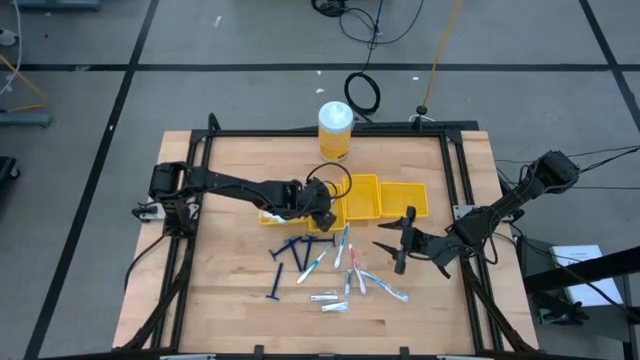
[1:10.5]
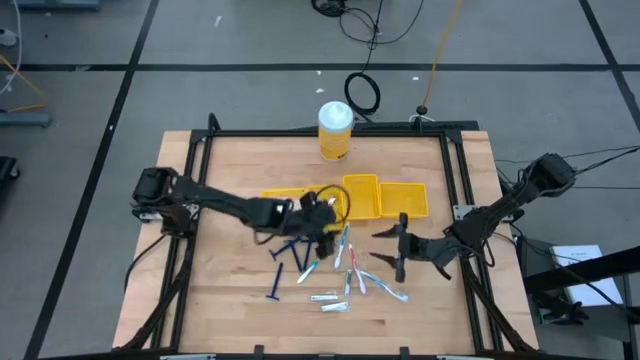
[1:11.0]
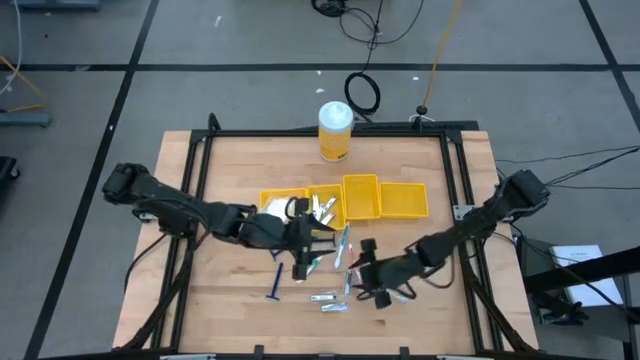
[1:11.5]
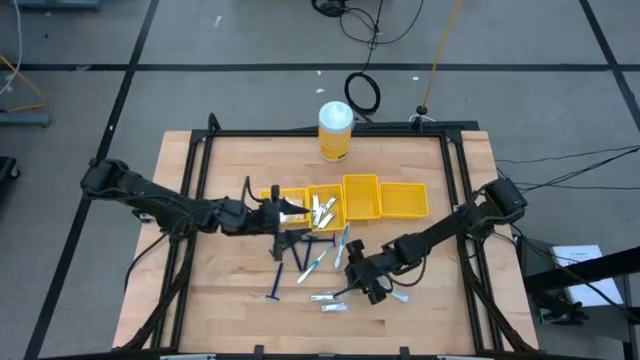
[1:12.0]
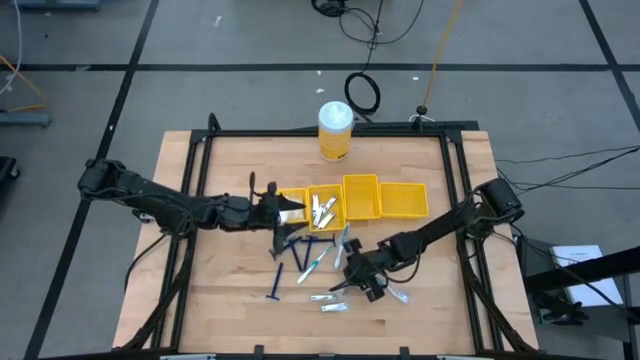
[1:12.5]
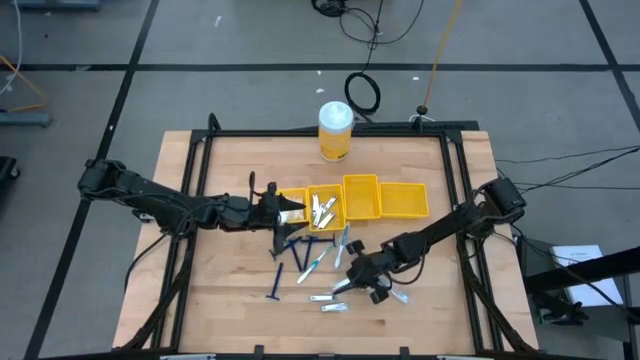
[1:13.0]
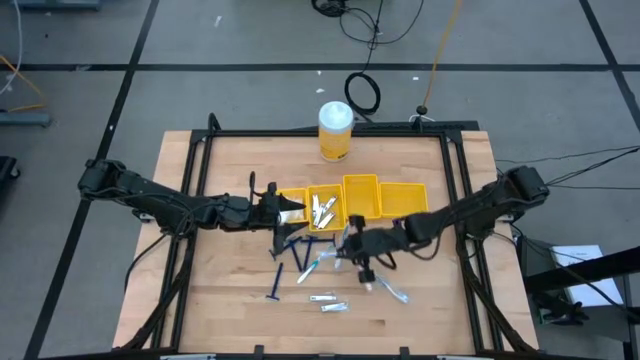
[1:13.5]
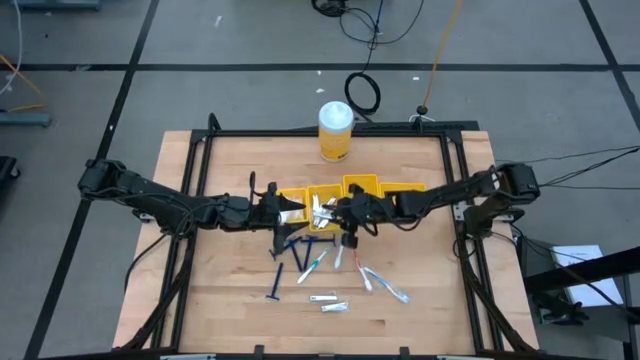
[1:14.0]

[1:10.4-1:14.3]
Task: Pick & Place Travel size toiletries
Put the top silver nail cutter into the middle left yellow bin

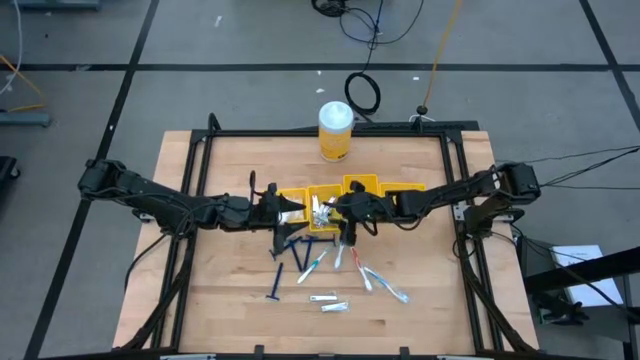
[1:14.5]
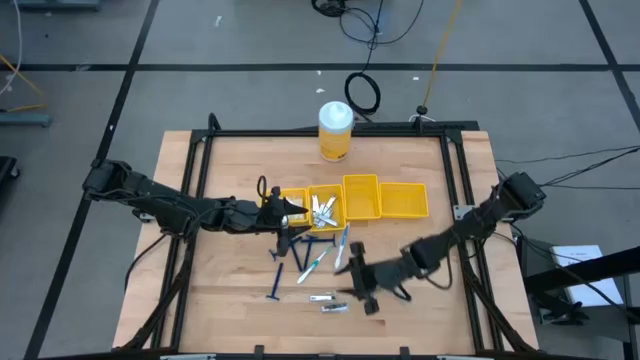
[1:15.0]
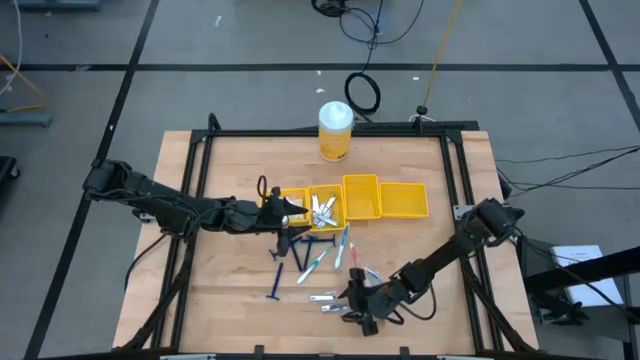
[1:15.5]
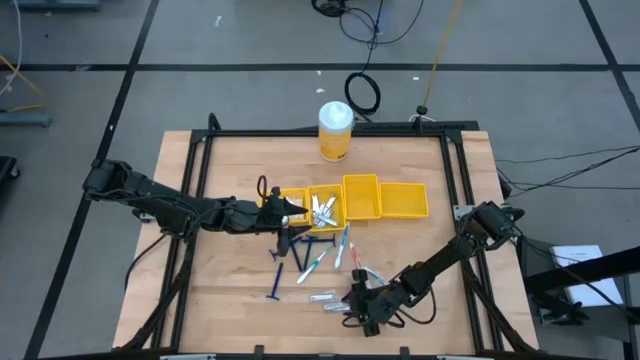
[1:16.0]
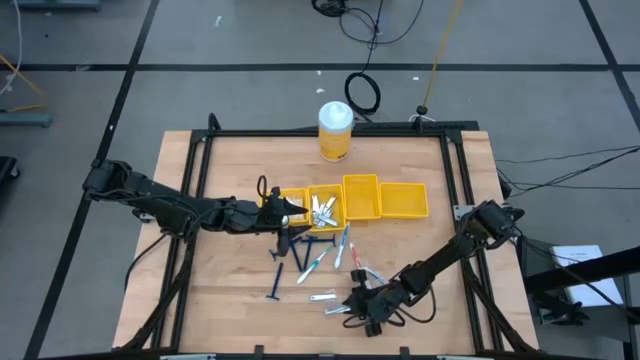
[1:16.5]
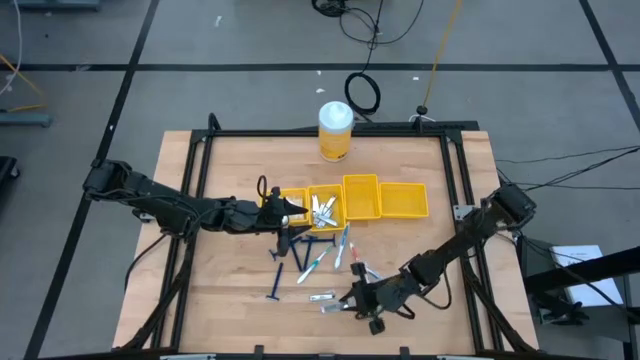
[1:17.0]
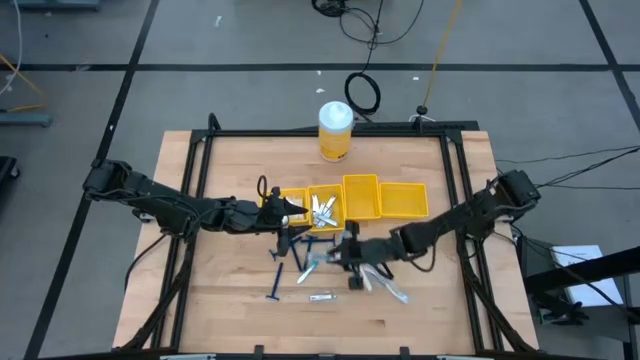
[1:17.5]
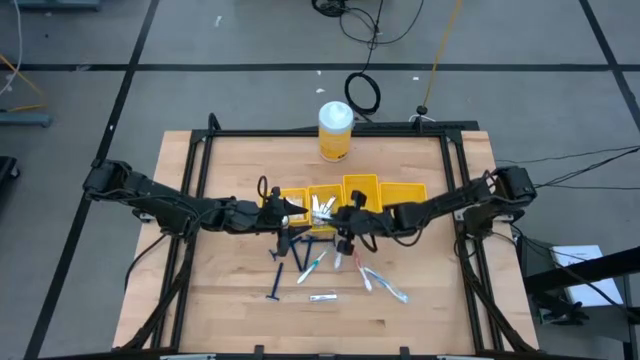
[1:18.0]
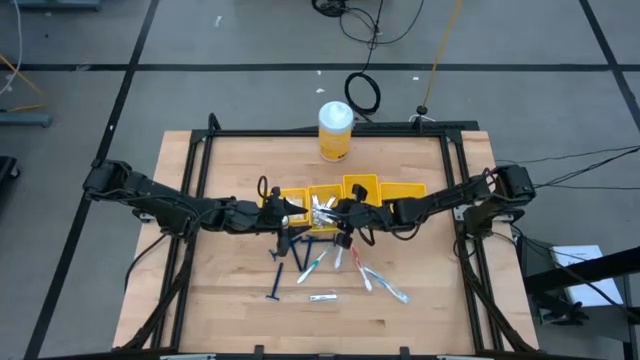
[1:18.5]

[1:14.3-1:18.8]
Put the bottom silver nail cutter into the middle left yellow bin

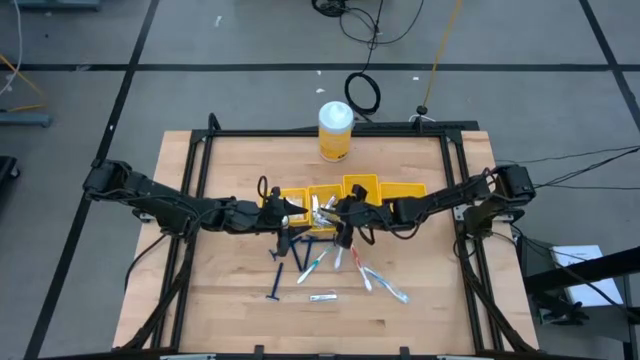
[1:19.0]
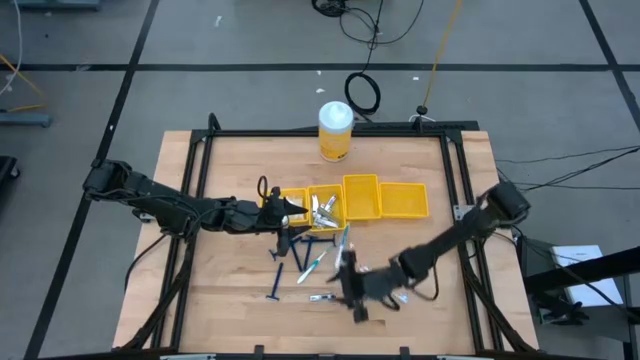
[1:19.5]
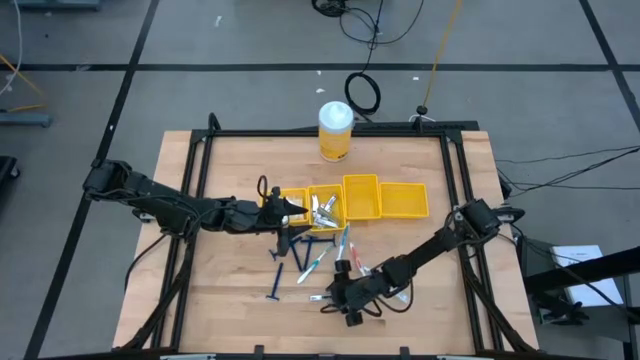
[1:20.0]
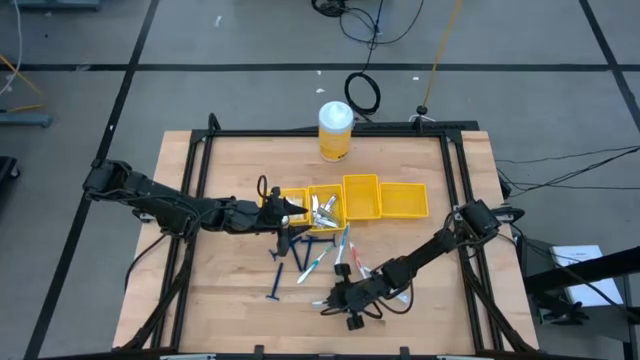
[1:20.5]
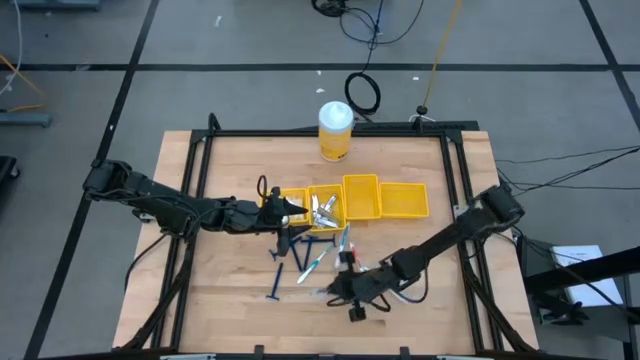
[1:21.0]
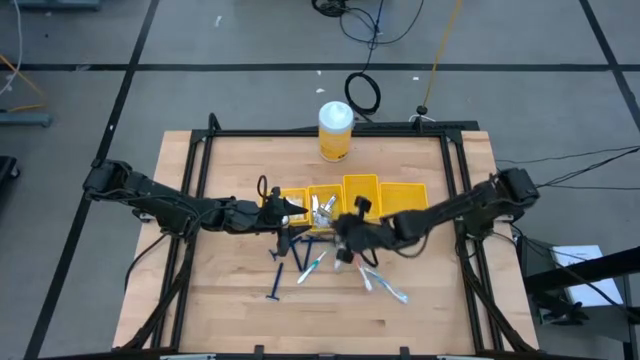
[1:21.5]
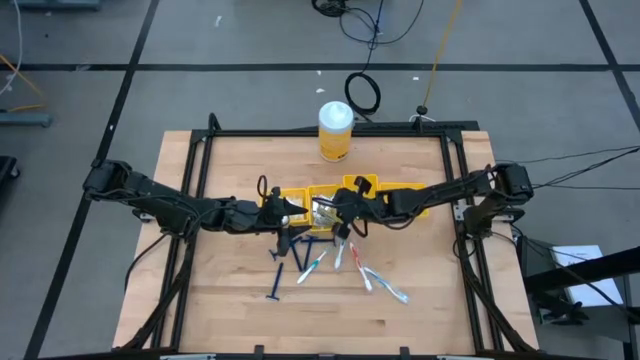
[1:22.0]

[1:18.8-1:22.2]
Put the silver nail cutter into the middle left yellow bin

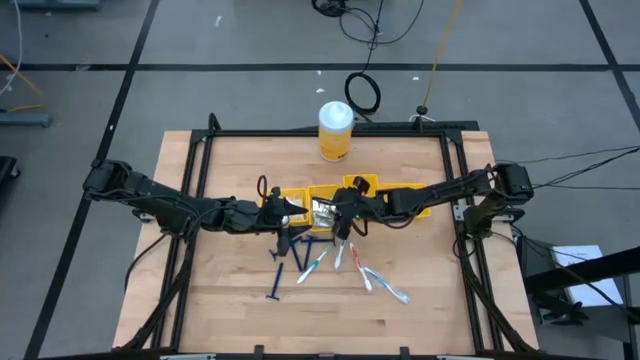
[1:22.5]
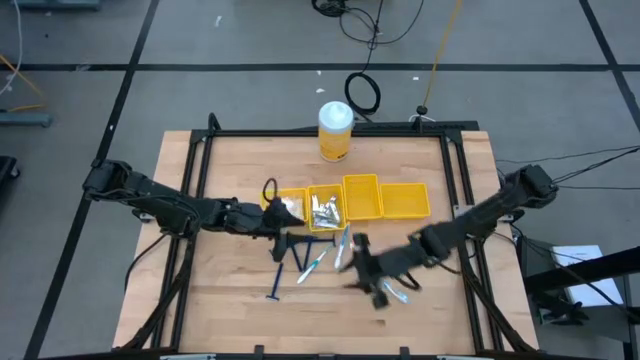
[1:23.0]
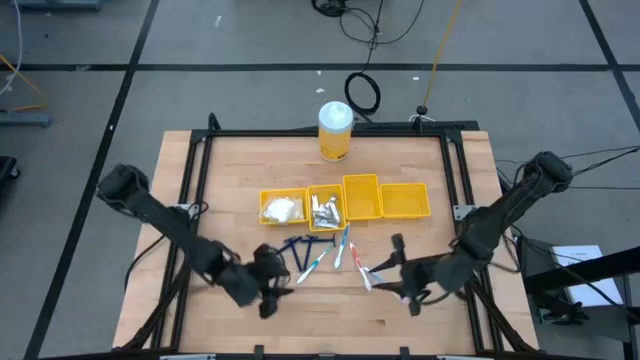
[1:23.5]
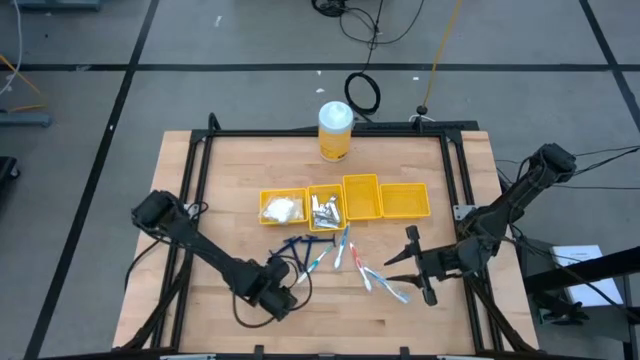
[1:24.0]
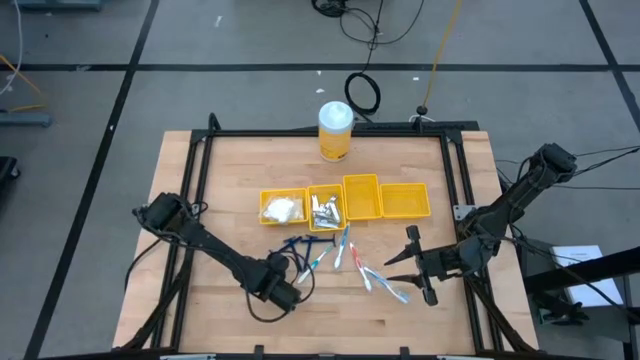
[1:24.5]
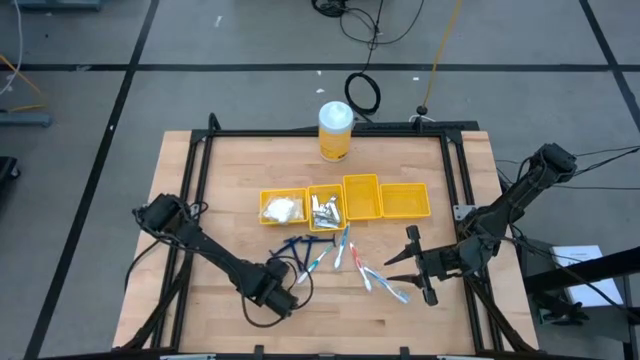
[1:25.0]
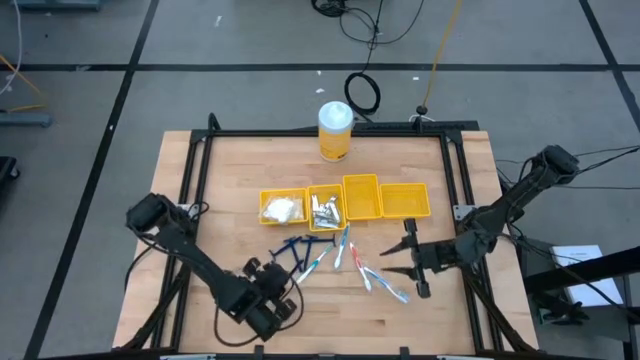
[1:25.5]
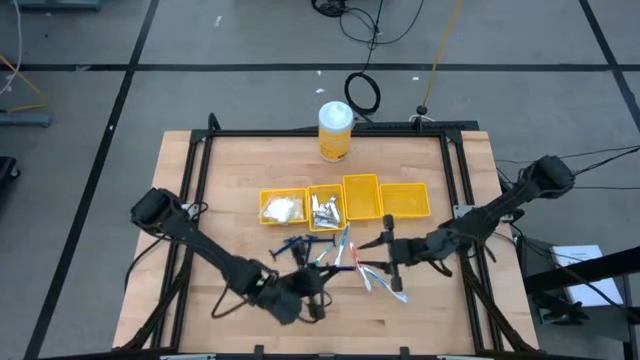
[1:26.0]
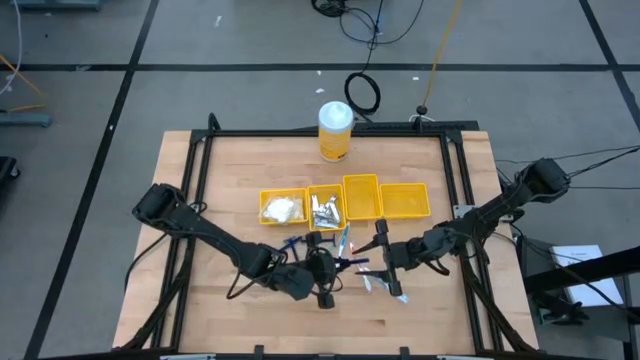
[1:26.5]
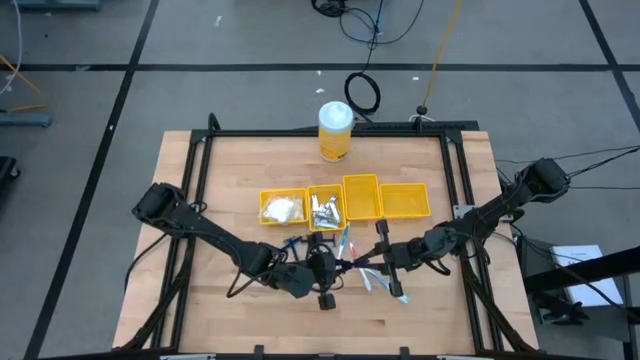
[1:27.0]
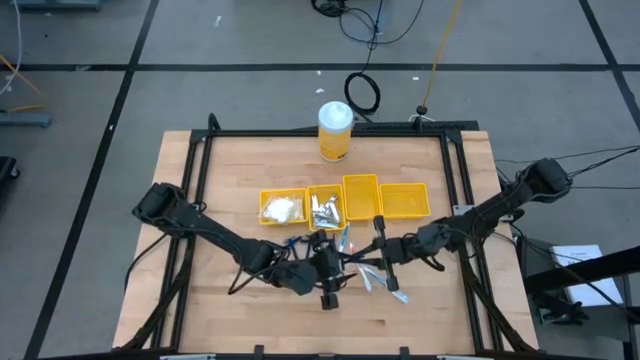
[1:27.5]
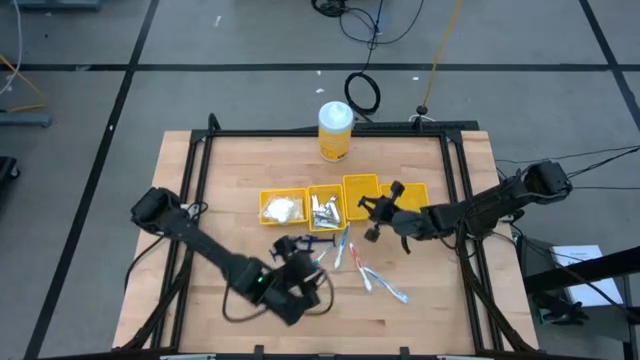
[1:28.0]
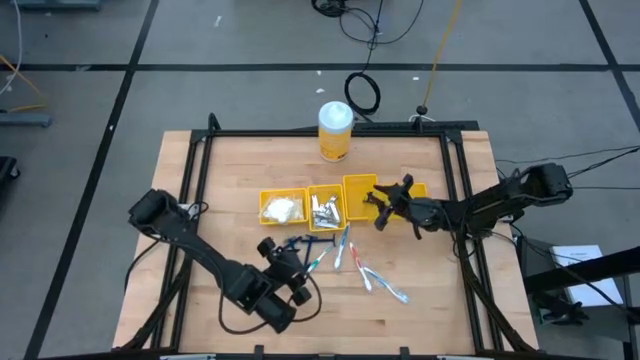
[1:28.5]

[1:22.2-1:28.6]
Put the blue razor into the middle right yellow bin

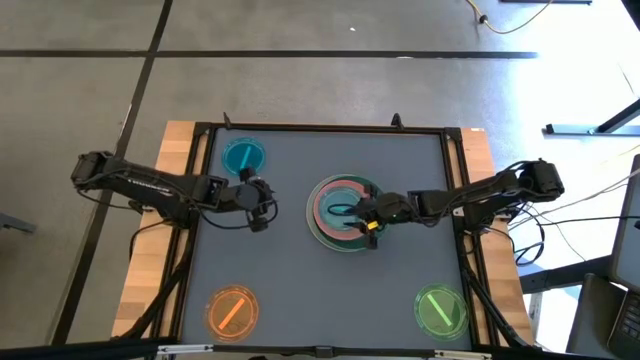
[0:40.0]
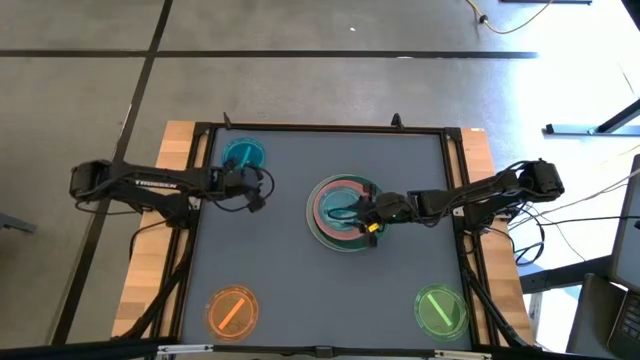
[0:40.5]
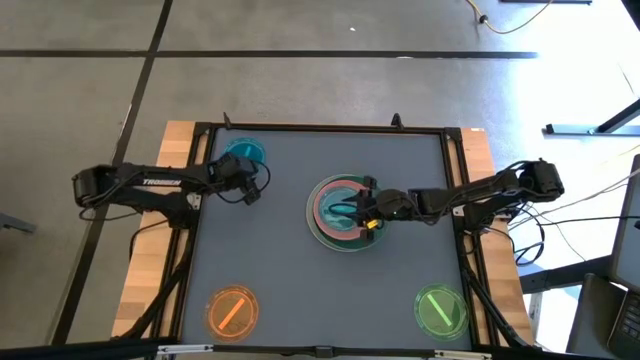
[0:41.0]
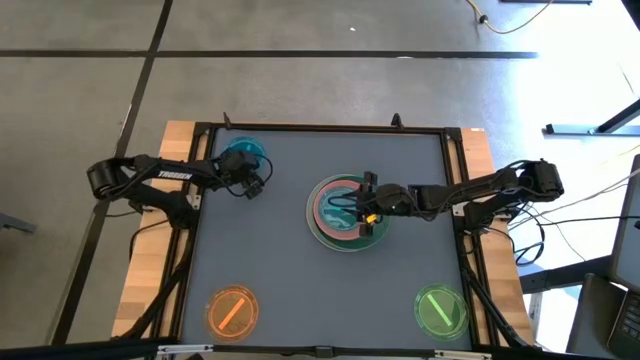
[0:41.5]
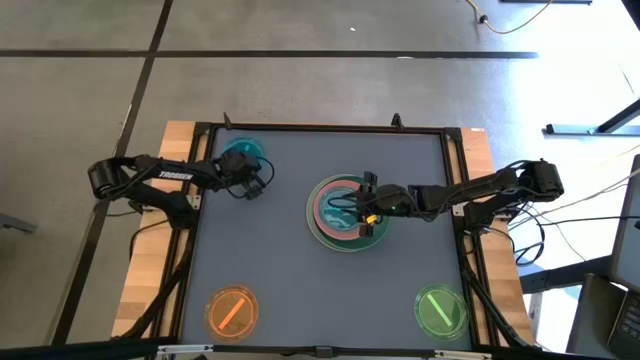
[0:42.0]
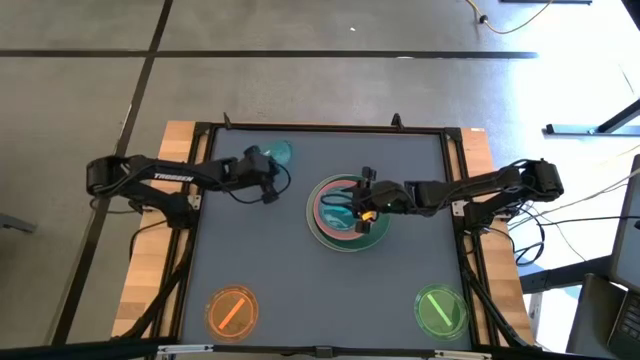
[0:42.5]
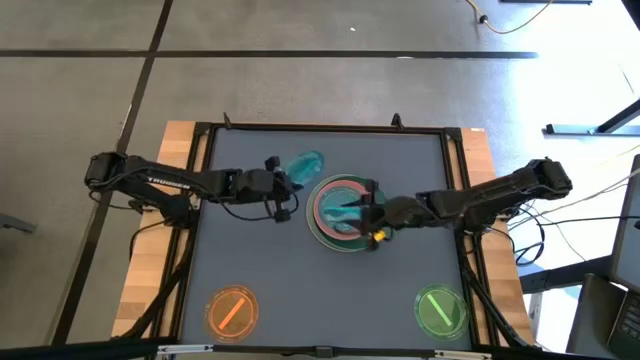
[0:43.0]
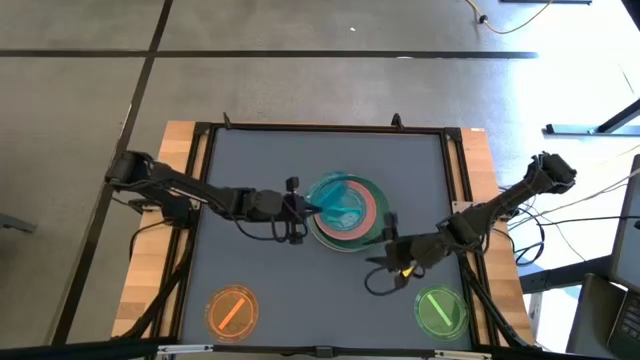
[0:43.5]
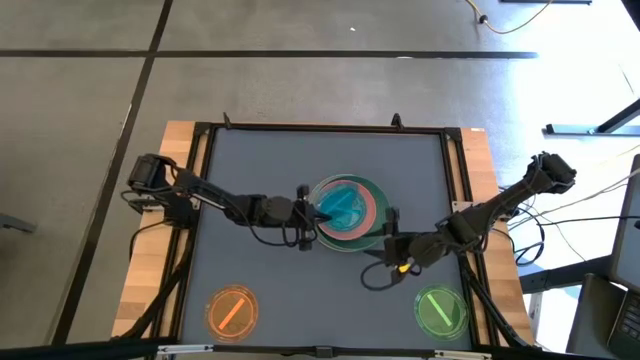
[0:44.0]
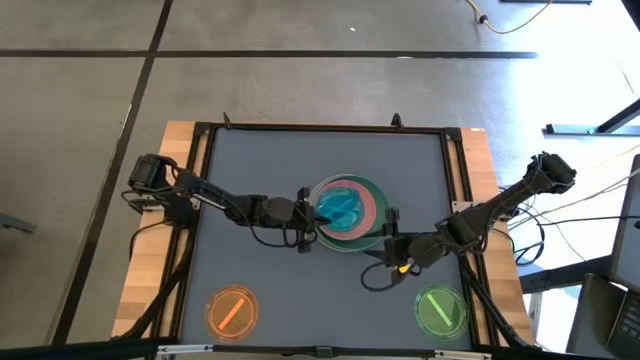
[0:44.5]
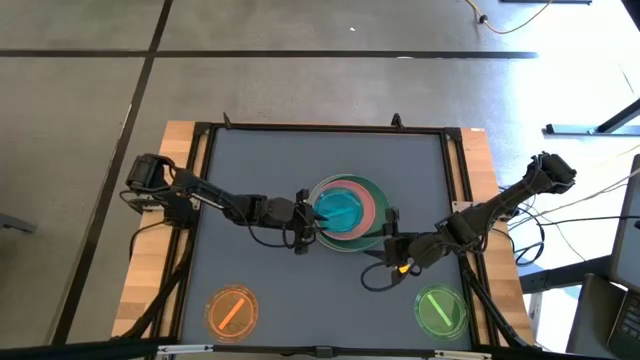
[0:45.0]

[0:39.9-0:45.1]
Task: Stack plastic plates
Stack the transparent blue plate on top of the other transparent blue plate
